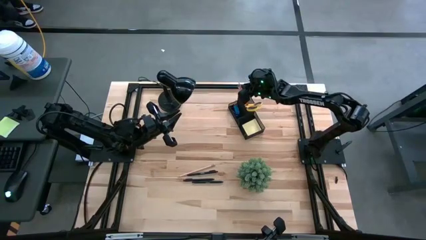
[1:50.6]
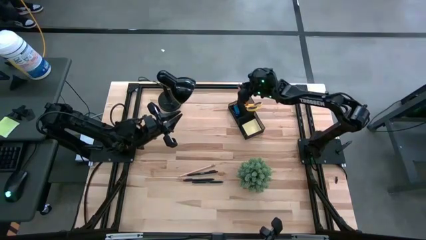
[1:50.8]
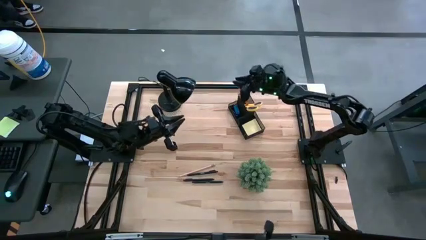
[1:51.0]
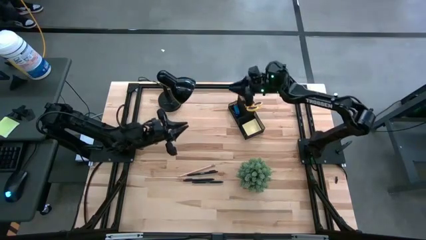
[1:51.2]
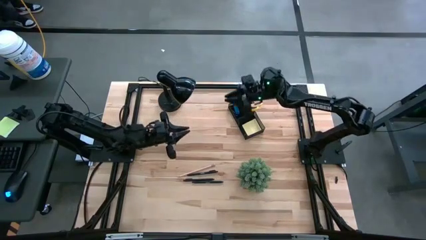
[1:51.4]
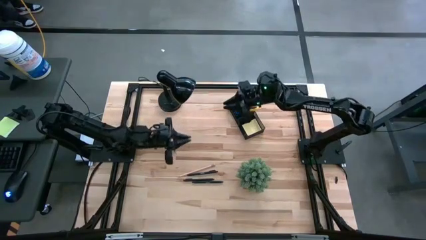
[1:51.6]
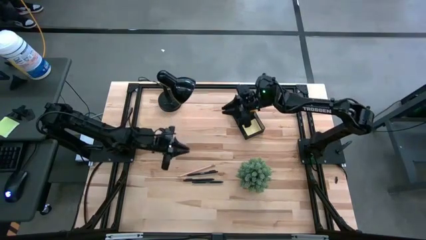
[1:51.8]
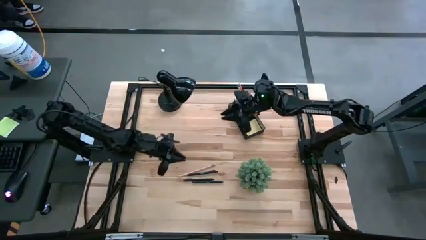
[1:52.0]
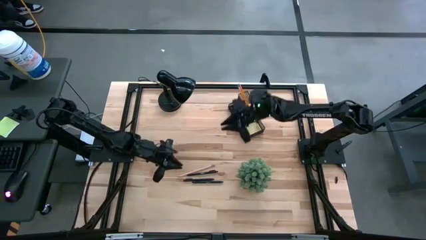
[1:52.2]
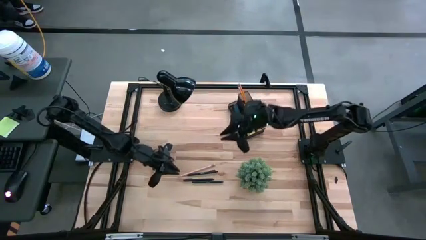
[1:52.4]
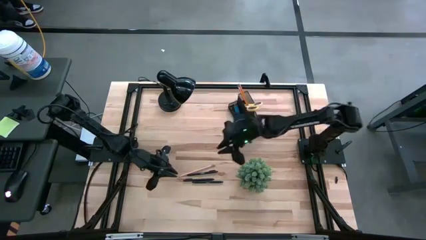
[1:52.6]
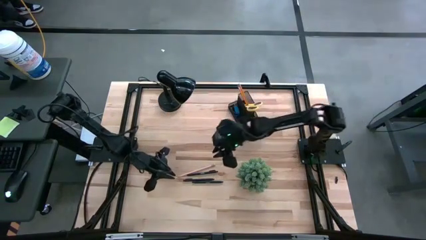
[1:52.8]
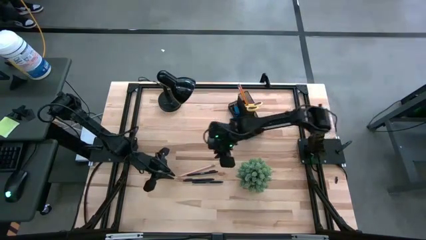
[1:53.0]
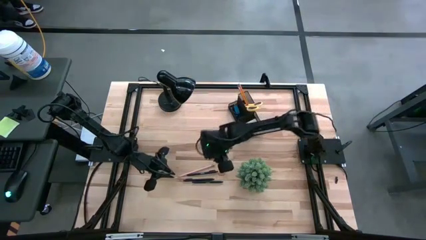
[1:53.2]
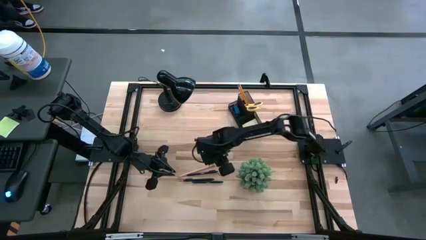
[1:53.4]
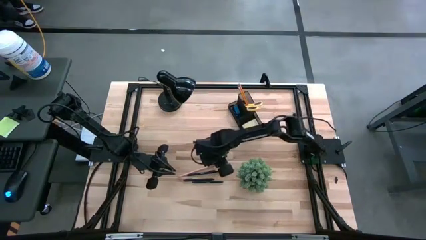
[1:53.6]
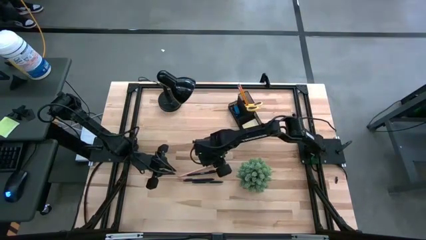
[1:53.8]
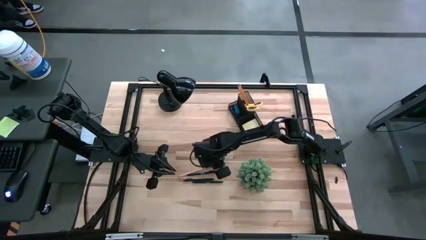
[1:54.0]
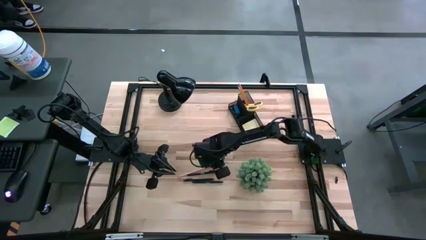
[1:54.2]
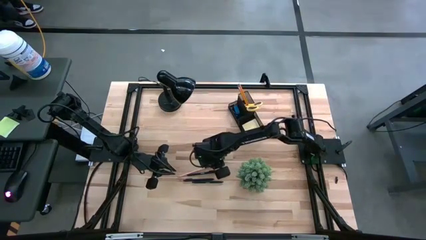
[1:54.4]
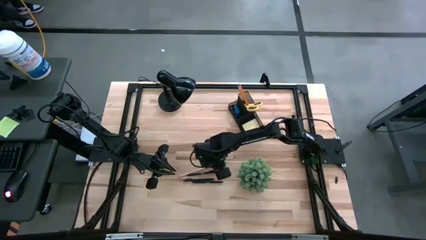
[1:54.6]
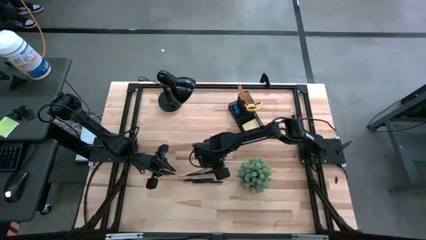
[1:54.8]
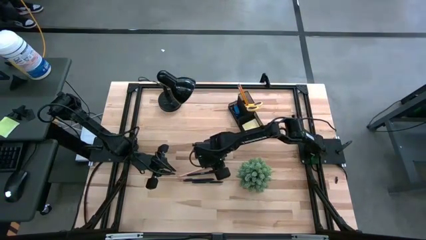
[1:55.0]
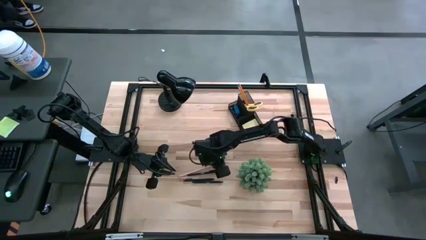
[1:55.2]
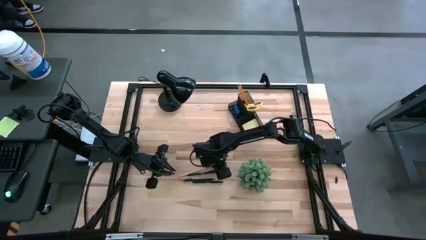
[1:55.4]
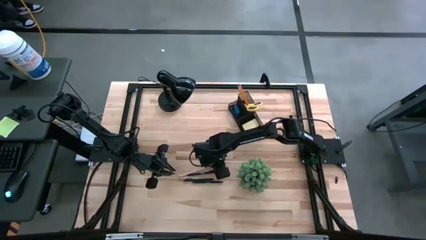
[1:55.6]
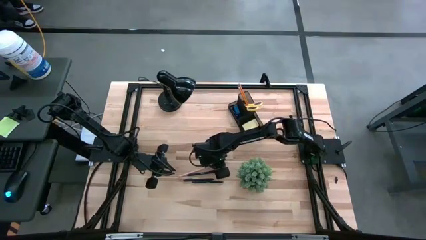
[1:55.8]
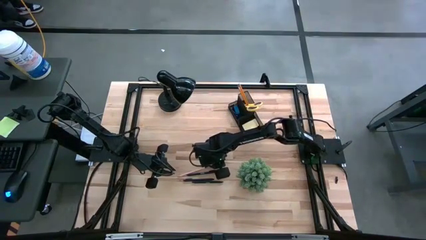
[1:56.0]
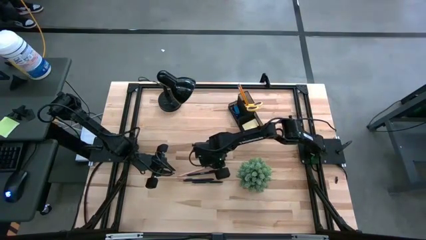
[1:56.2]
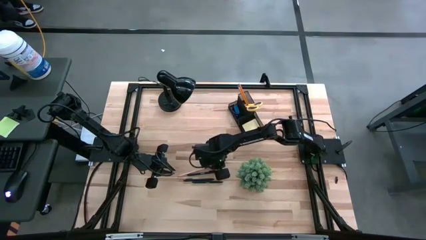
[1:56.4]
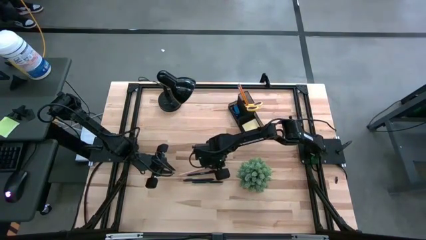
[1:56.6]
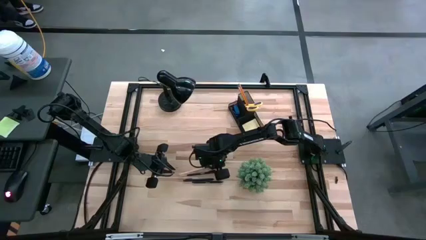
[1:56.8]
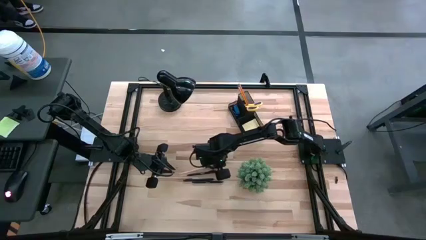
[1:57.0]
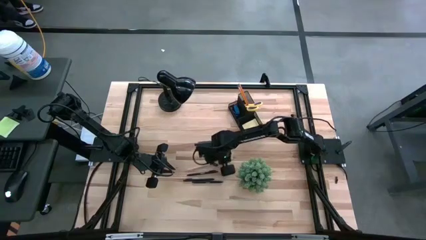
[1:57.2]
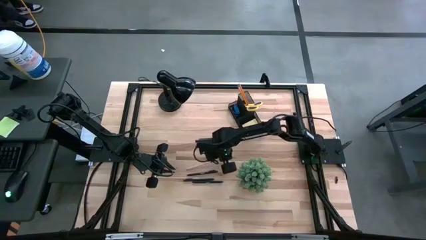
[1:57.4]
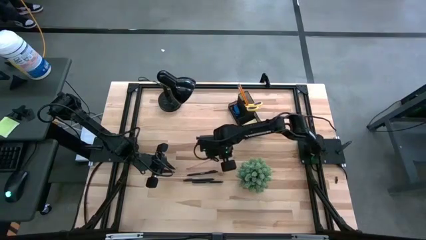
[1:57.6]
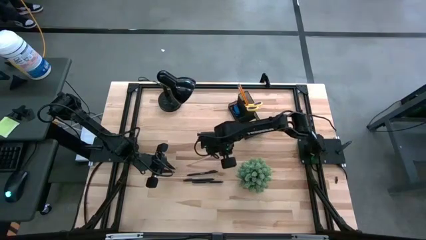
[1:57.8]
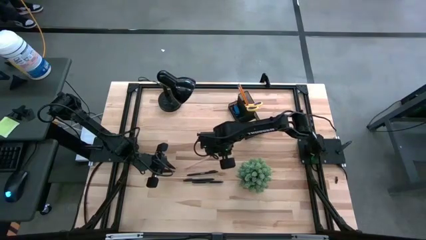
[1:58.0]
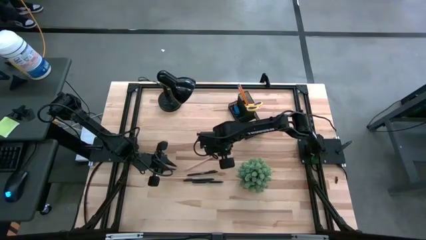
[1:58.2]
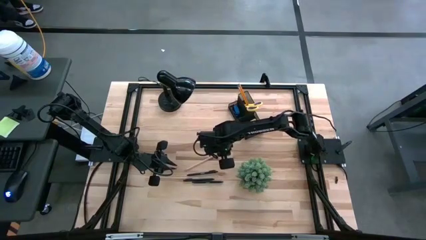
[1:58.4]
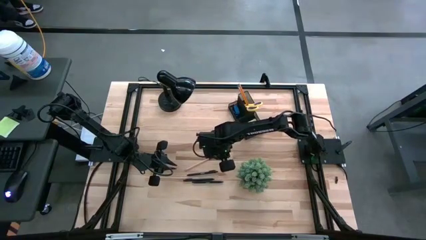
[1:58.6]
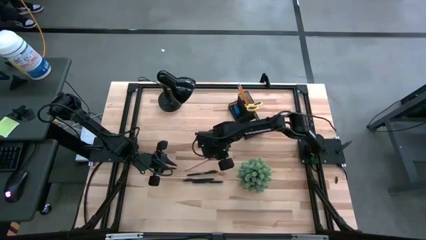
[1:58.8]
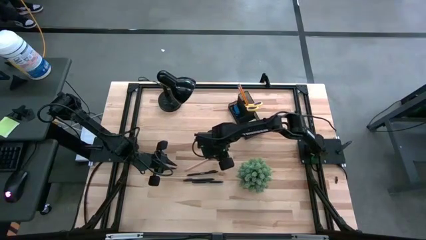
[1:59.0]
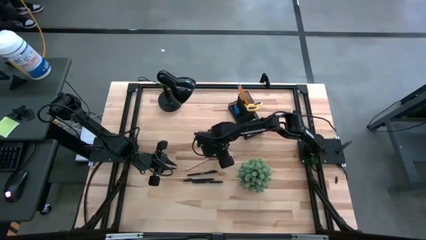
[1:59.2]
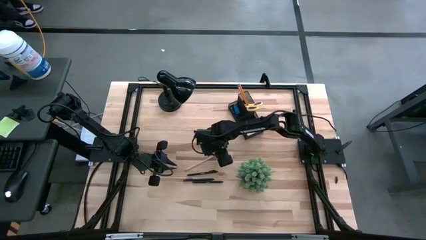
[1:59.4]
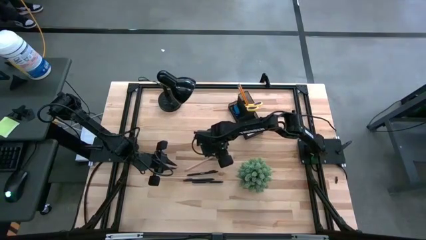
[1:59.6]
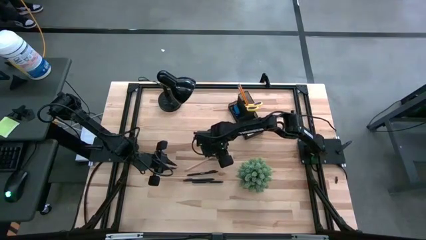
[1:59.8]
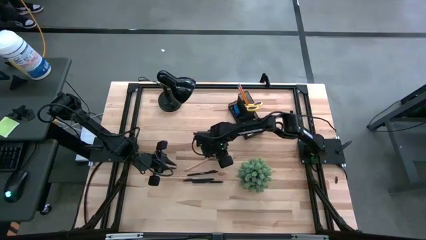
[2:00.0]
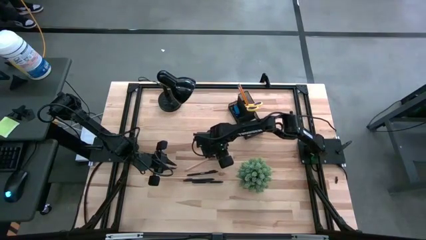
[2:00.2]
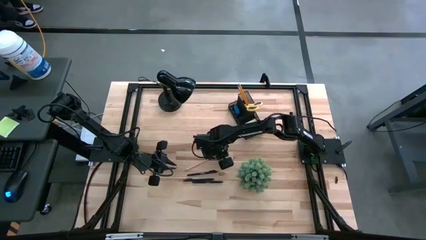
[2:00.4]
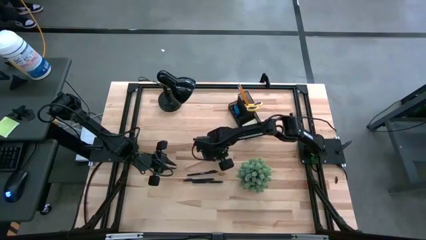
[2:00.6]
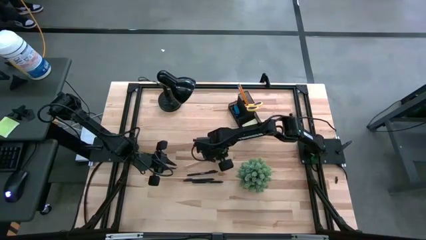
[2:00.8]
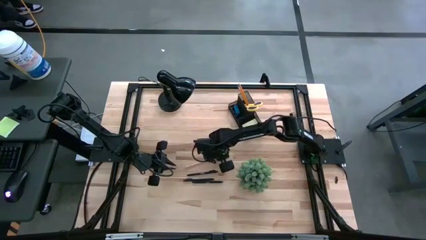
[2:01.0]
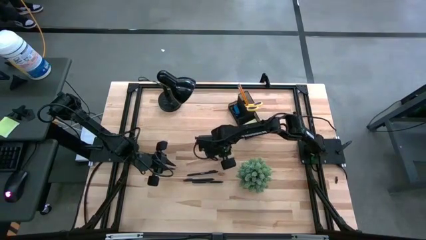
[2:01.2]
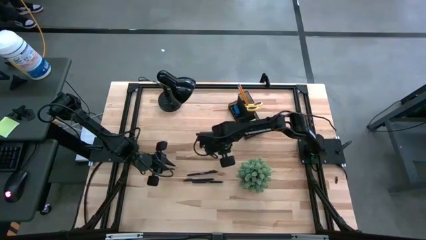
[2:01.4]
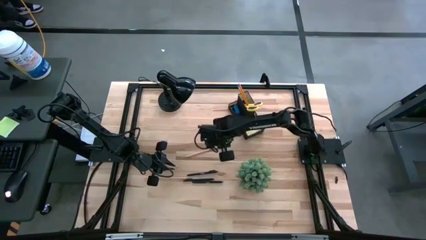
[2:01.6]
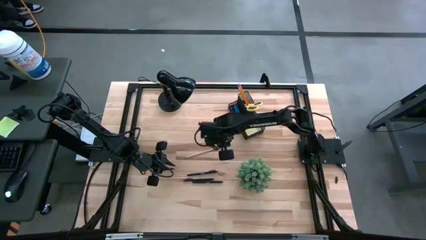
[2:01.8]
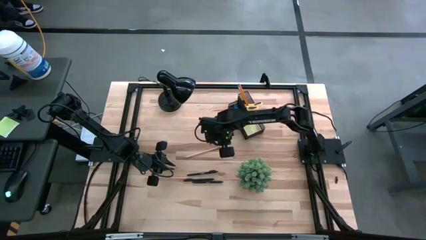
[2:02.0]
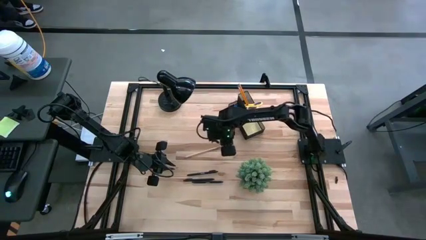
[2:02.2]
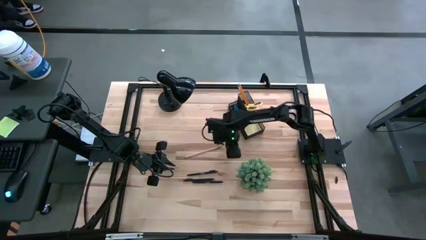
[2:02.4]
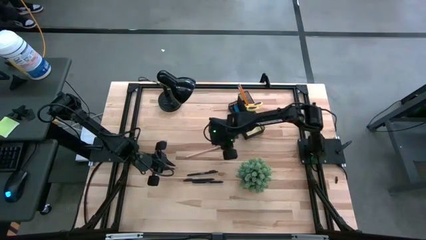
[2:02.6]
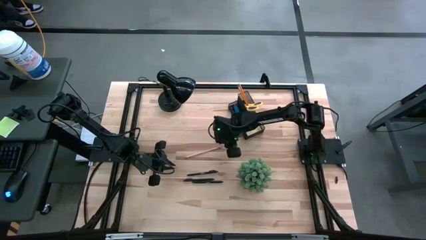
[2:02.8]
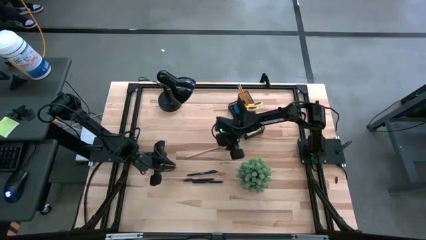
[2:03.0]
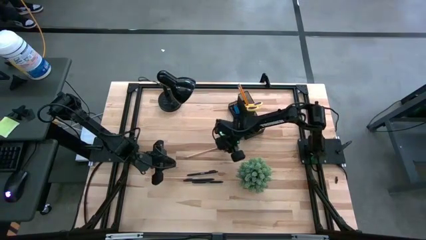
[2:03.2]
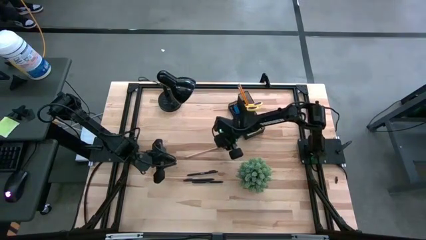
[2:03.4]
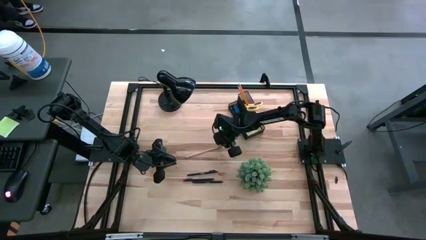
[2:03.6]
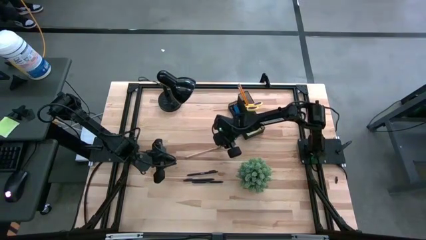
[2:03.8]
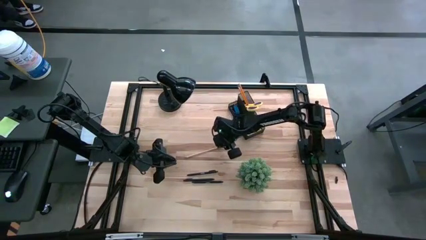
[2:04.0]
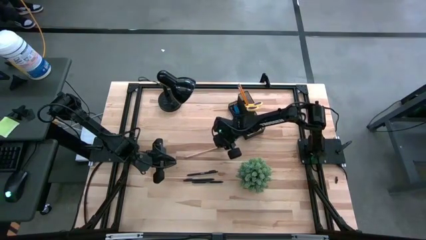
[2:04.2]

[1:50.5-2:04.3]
Task: Pick and place office supplies into organizer
Put the white pencil into the desk organizer

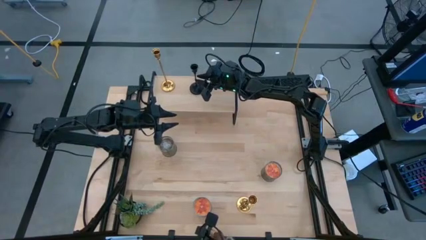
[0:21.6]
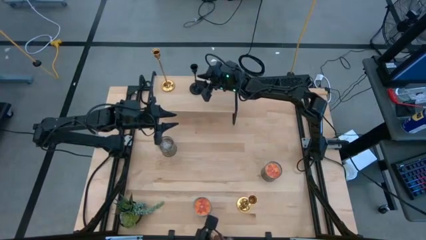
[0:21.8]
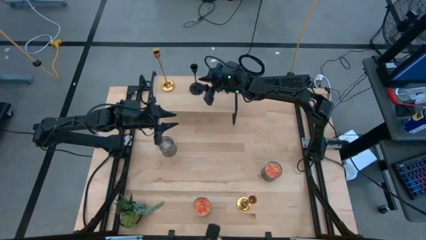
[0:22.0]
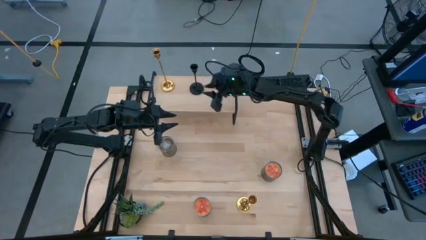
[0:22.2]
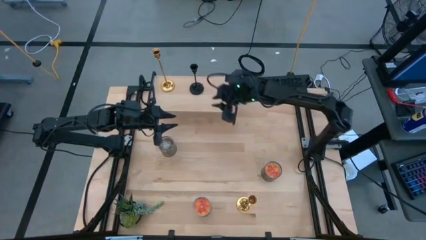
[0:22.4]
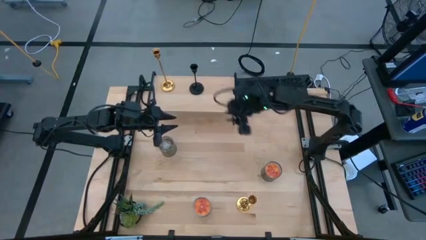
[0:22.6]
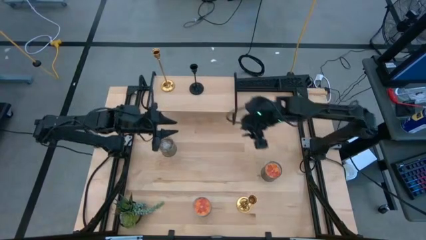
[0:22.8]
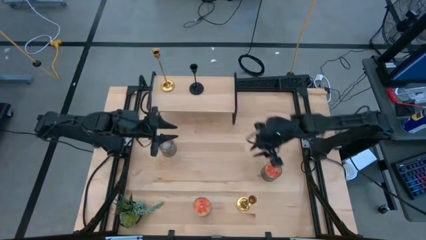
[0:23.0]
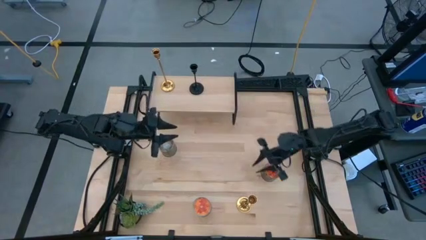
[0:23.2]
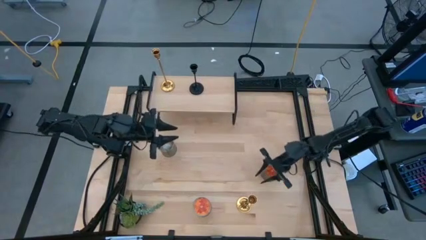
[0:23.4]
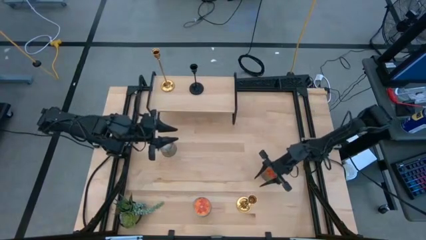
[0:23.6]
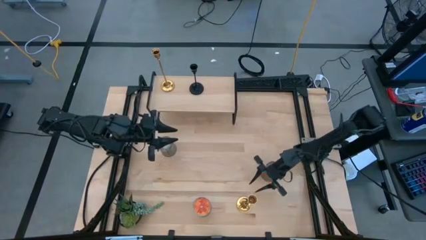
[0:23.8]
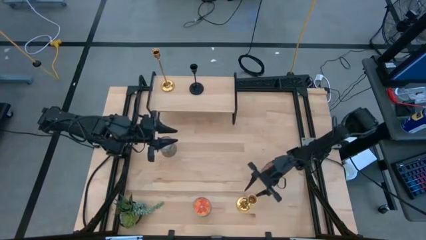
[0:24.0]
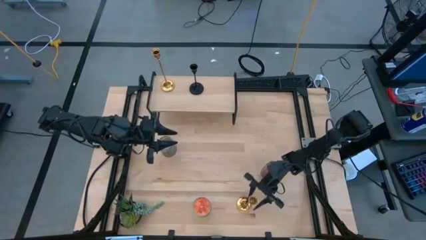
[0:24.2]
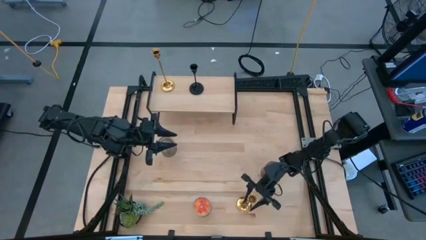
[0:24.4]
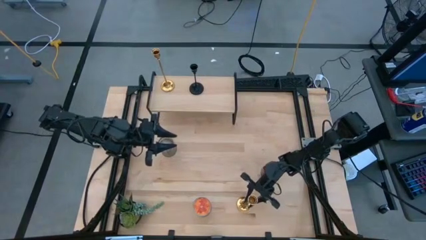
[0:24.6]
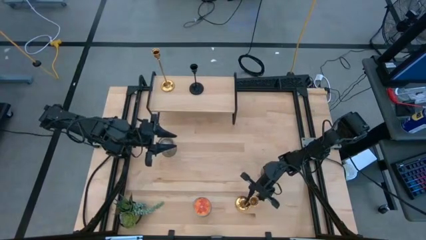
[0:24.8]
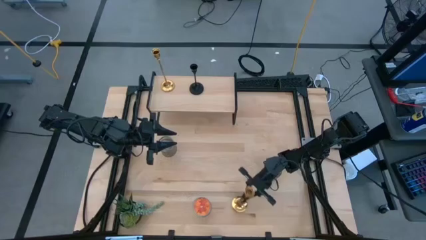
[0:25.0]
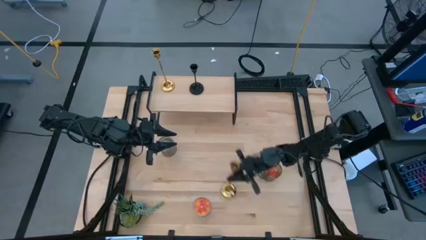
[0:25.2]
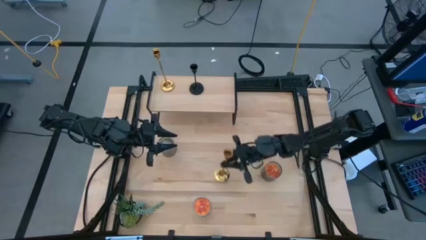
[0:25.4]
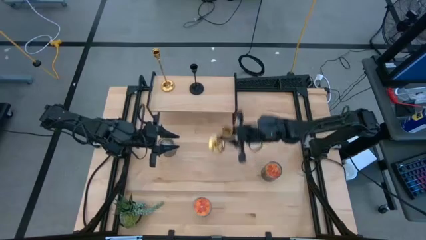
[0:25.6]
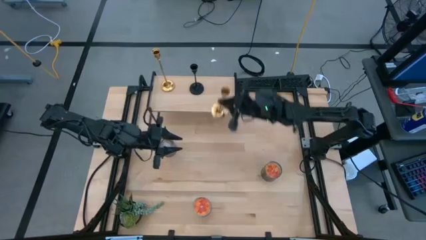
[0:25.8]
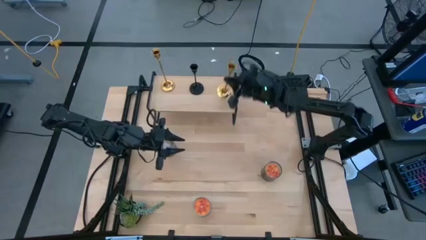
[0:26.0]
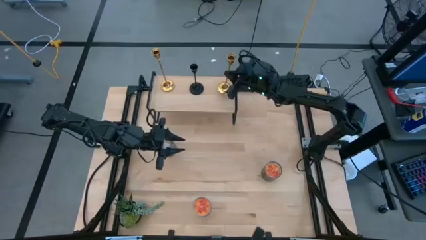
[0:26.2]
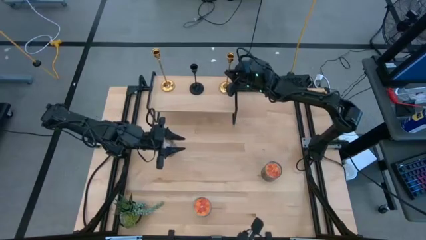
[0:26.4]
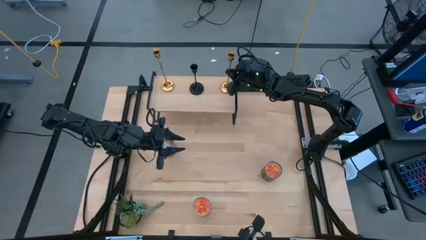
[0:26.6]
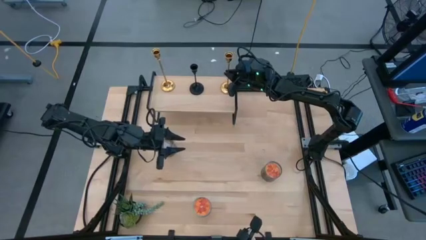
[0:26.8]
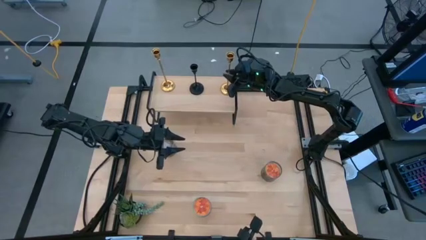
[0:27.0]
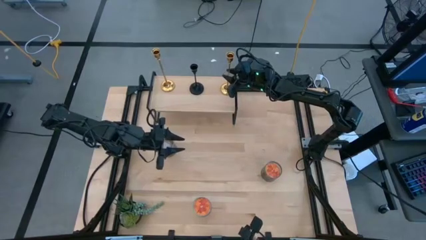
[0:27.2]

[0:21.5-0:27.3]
Task: Pick & Place candle stick holders
Put the gold candle holder on the shelf
